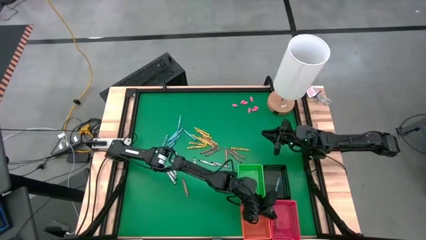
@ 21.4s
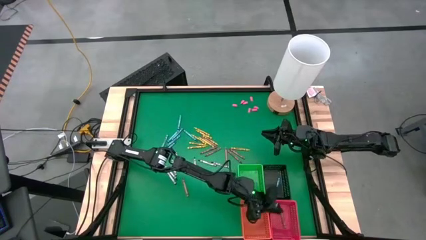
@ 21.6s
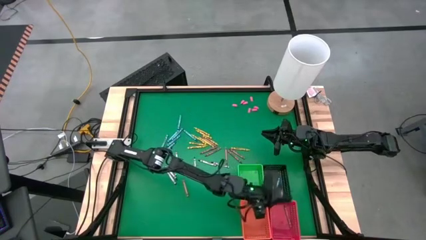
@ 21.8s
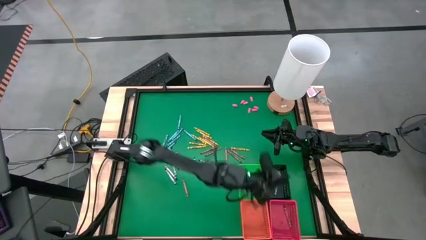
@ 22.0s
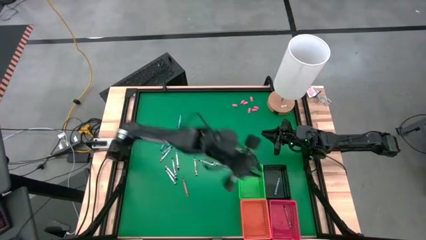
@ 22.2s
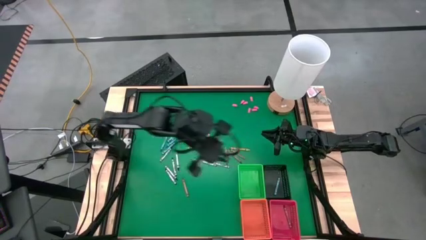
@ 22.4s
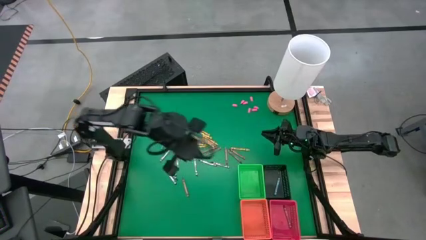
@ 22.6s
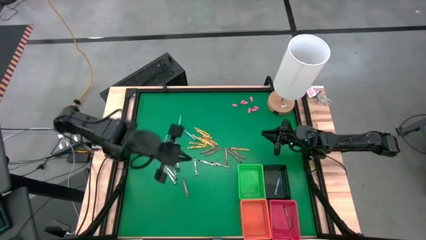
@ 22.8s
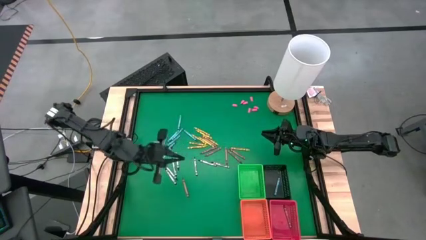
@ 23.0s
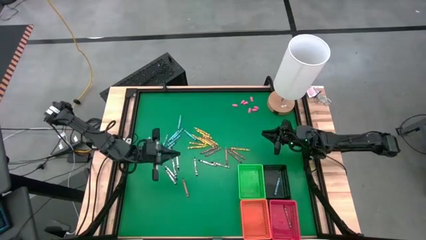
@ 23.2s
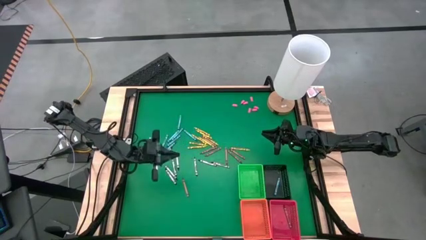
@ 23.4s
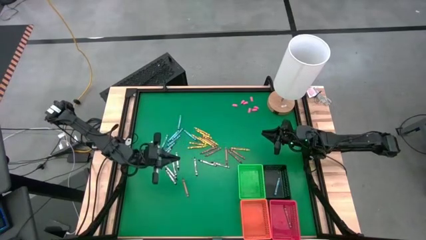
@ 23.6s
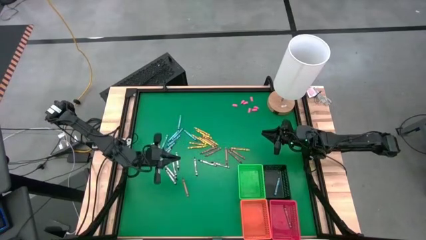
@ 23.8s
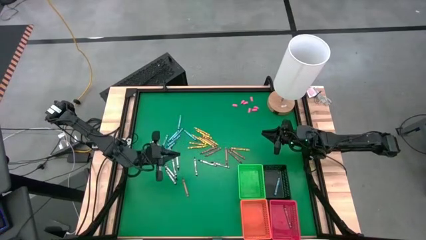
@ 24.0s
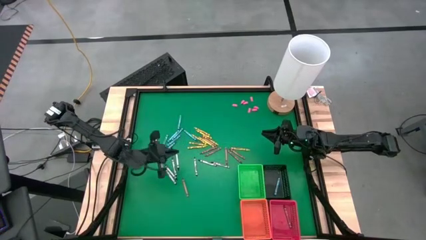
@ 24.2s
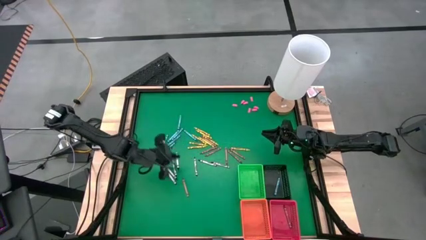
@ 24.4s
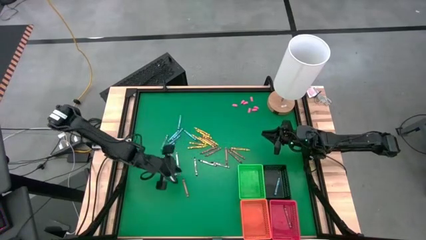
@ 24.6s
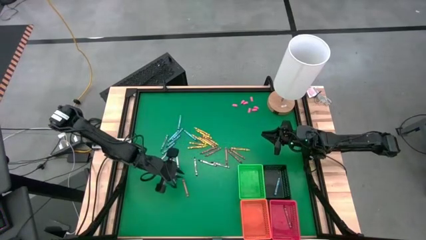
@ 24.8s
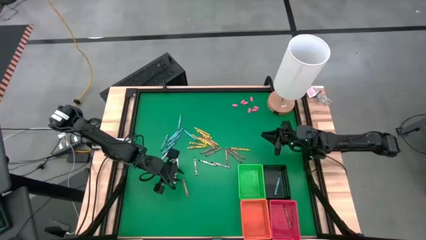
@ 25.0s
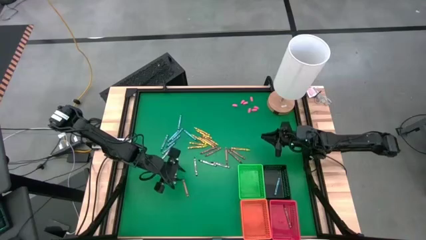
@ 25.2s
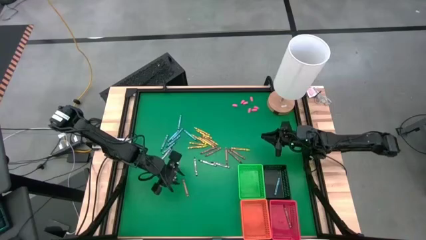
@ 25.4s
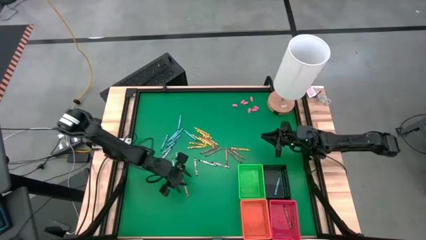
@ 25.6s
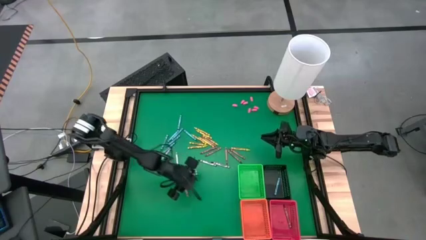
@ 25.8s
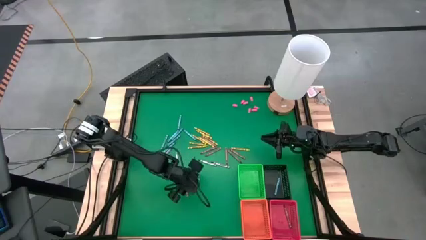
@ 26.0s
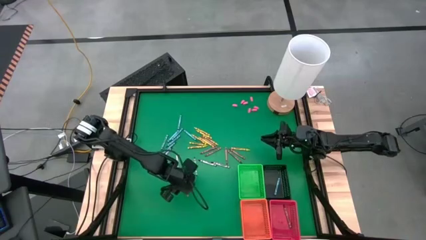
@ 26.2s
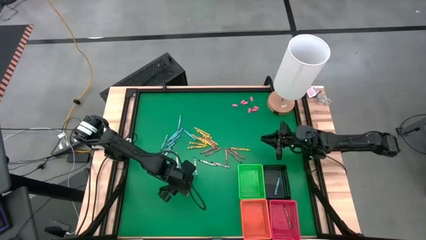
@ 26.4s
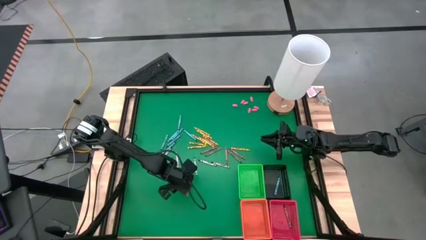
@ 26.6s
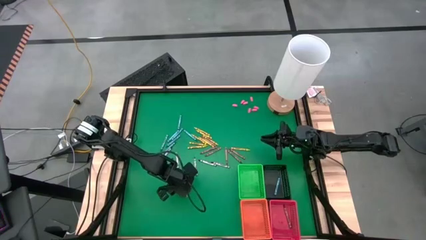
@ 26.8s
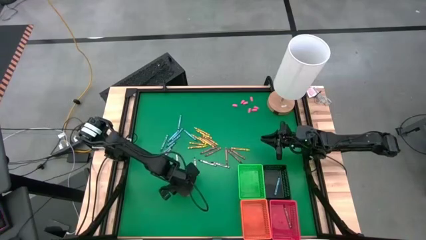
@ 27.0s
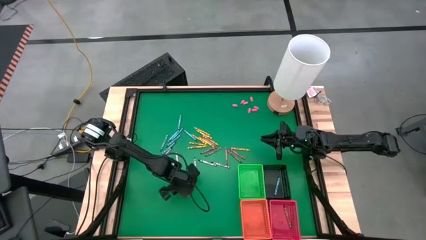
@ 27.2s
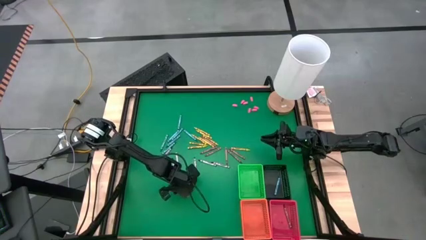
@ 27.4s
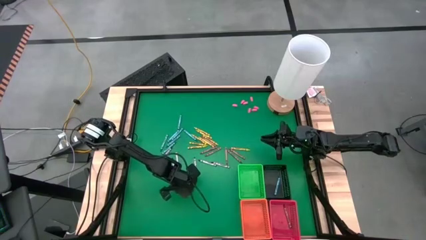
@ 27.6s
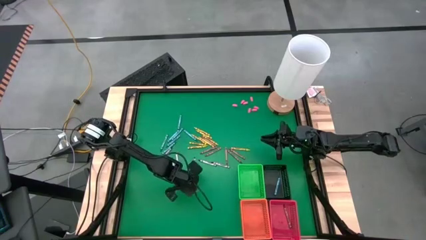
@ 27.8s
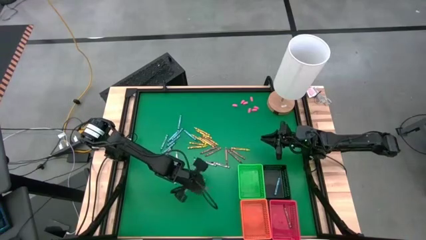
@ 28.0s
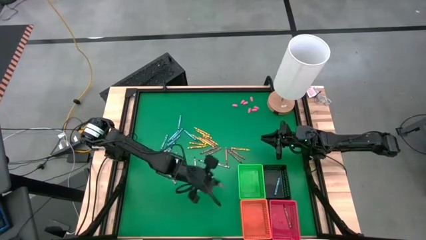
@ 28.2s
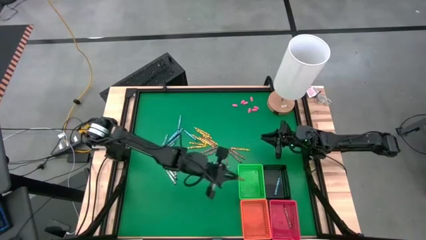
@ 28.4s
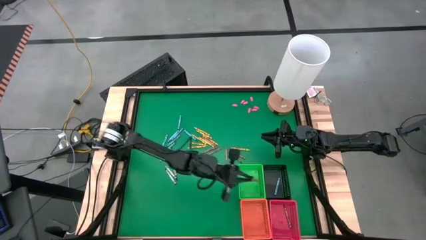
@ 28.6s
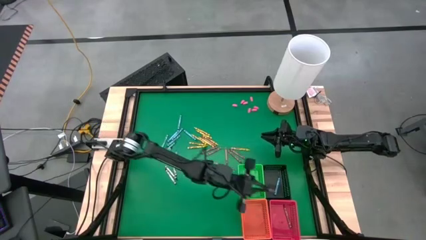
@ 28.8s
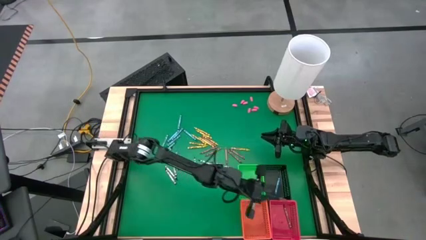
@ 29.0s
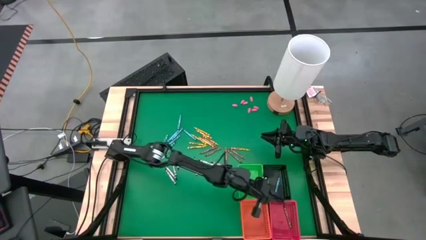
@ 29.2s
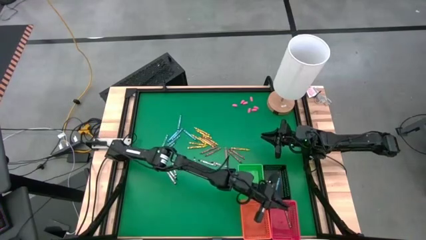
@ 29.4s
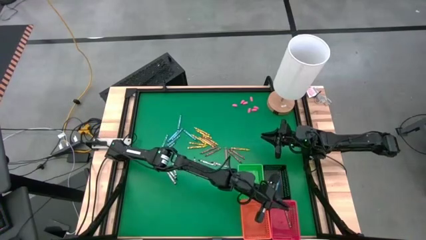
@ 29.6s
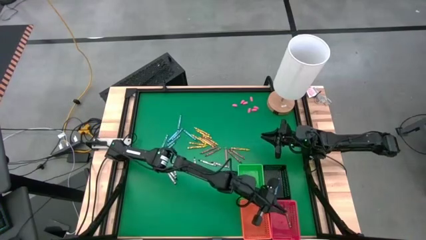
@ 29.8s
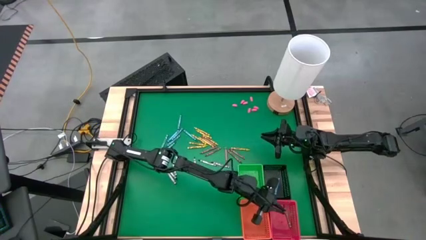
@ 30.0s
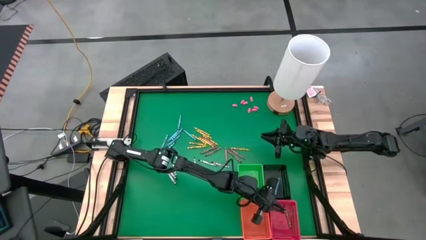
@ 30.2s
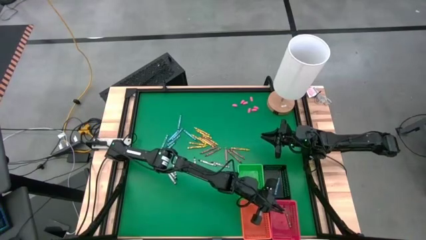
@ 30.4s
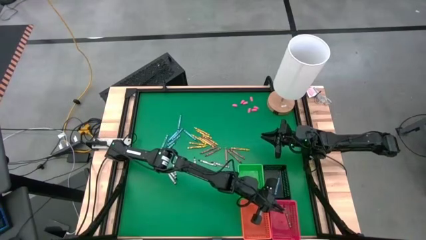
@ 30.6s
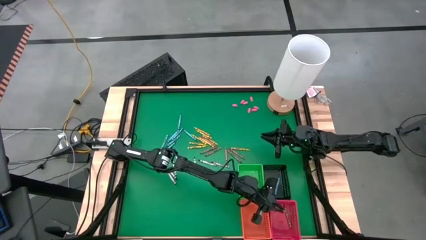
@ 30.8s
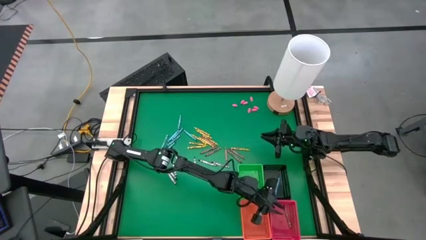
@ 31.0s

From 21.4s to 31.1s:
Task: Sort crayons
Put the brown crayon into the red bin

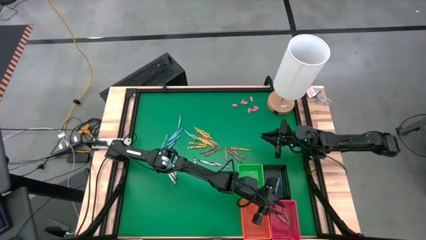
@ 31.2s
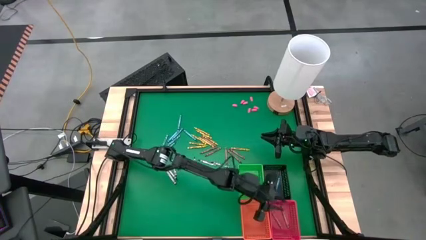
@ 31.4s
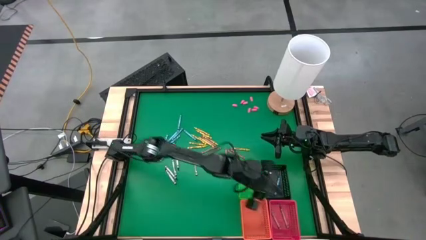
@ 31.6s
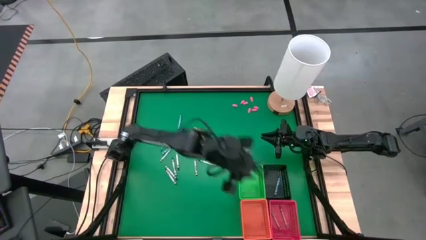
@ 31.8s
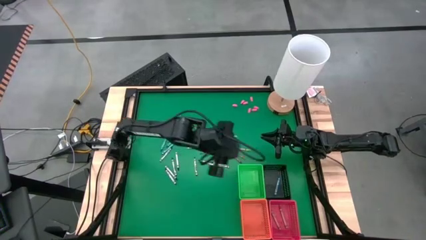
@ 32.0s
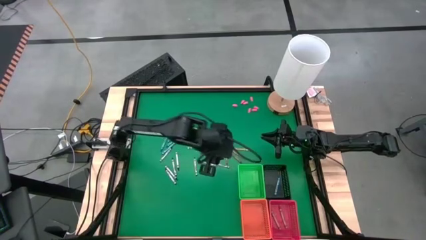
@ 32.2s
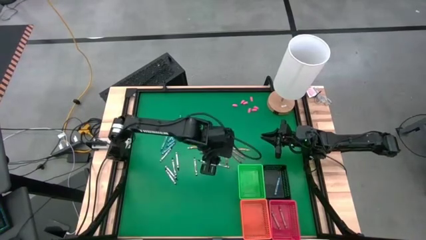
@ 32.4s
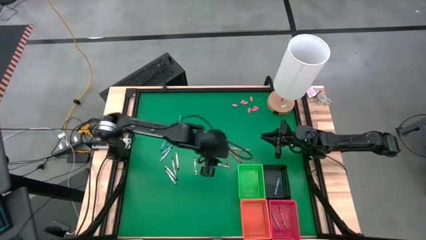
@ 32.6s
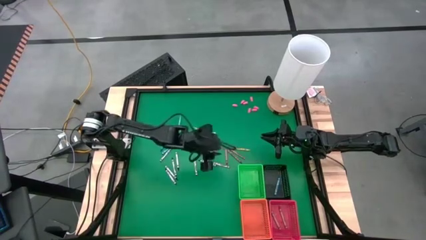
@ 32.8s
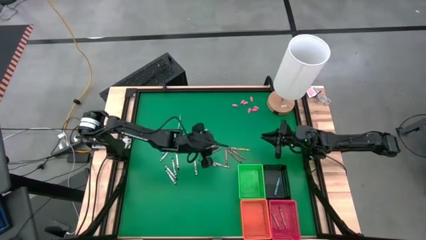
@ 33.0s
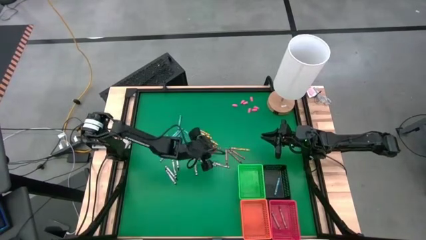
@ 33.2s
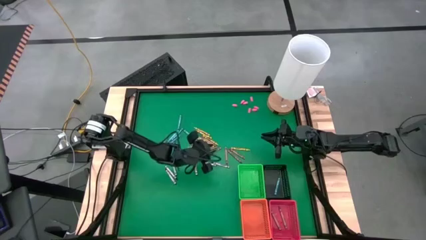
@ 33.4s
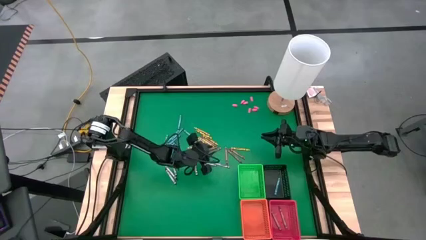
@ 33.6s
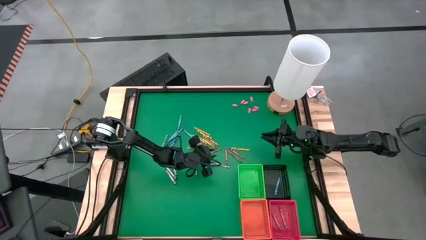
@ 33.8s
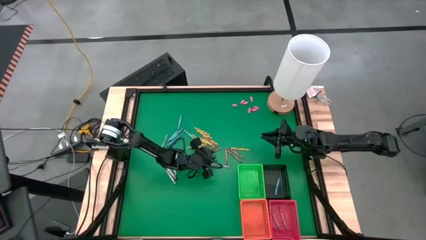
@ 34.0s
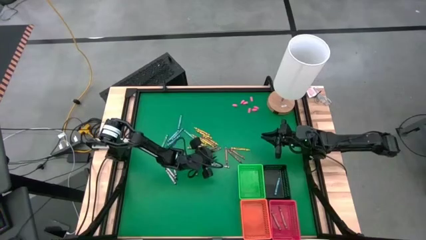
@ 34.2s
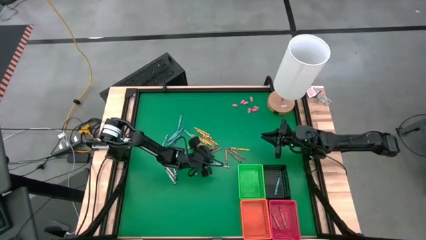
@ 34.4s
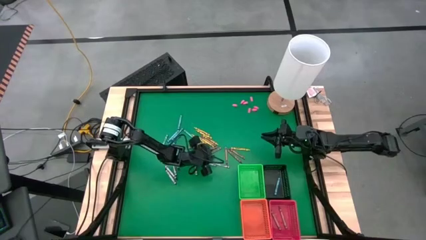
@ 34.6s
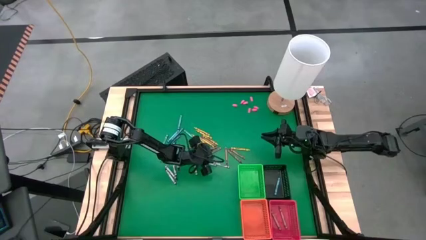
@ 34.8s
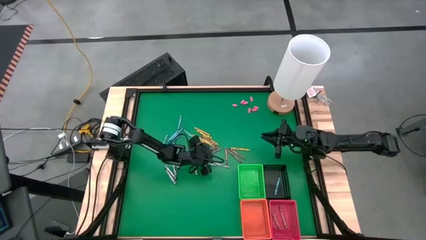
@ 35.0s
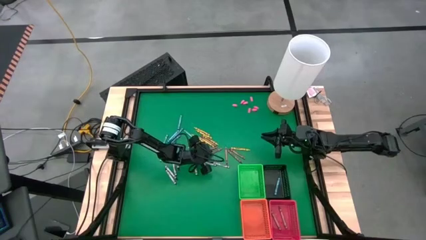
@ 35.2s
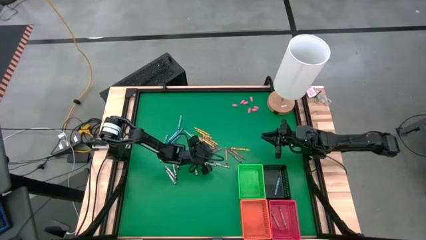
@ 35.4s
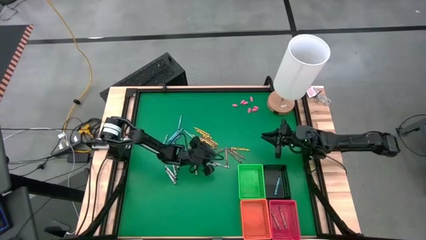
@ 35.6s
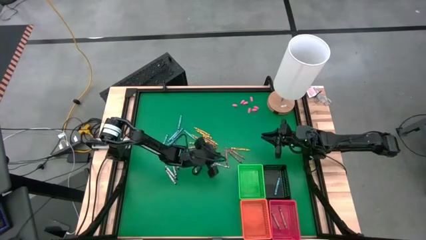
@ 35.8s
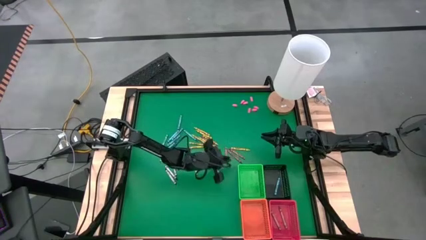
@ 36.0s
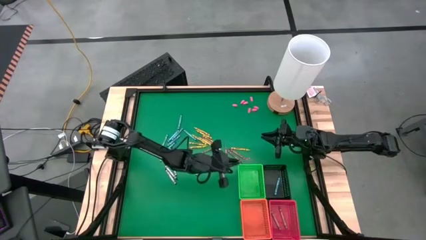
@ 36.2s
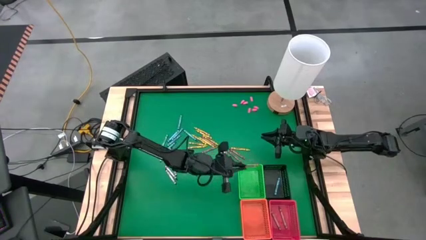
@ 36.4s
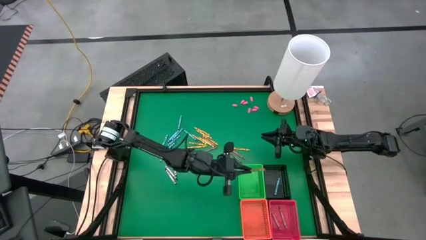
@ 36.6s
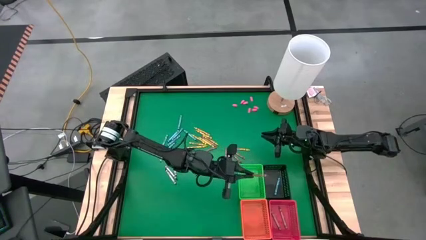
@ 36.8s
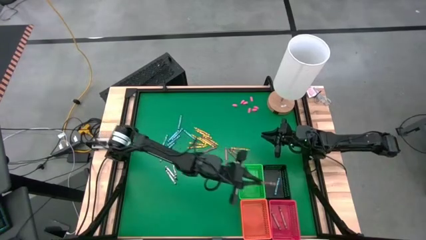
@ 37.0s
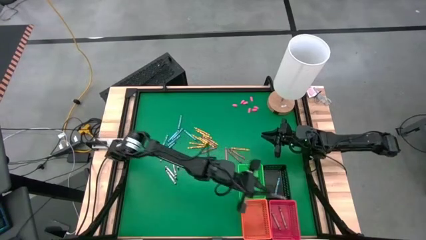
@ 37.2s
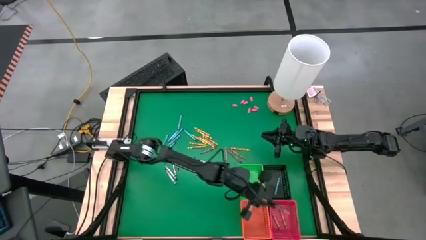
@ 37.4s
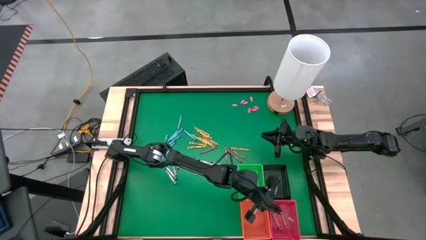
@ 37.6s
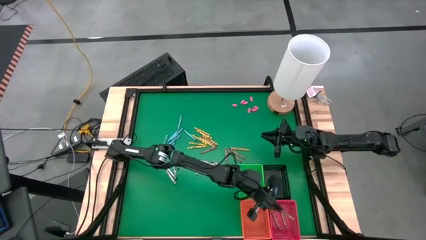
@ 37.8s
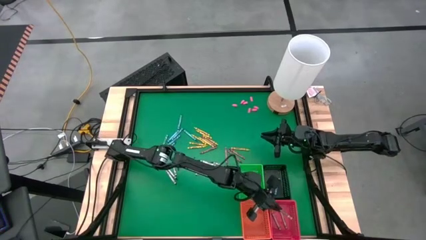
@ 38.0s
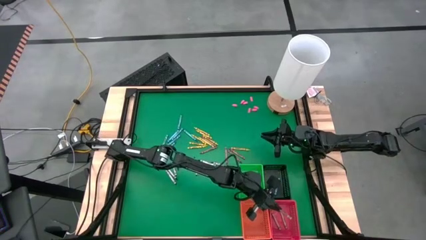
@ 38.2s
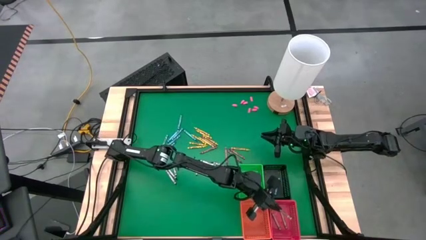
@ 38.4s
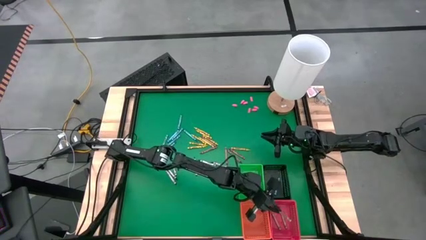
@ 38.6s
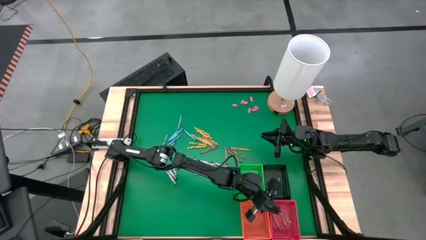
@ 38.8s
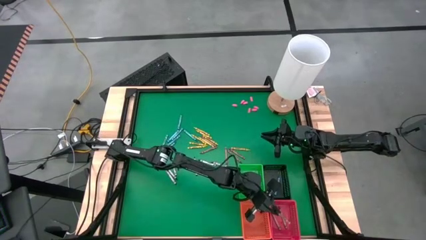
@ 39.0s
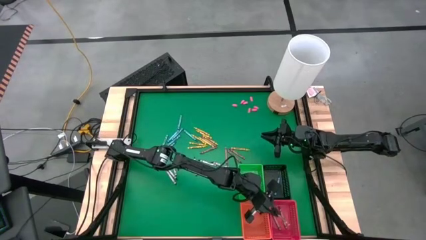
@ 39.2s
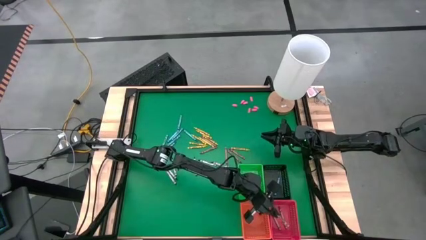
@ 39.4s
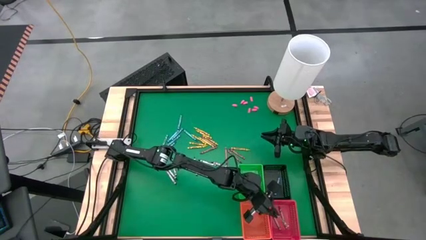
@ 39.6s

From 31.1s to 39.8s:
Put the brown crayon into the red bin
